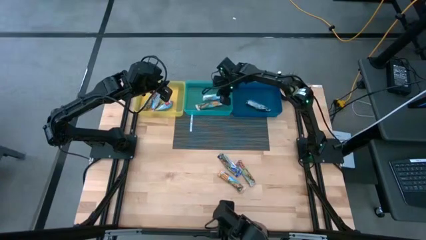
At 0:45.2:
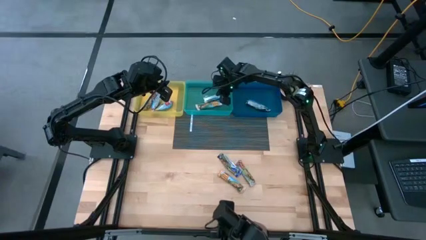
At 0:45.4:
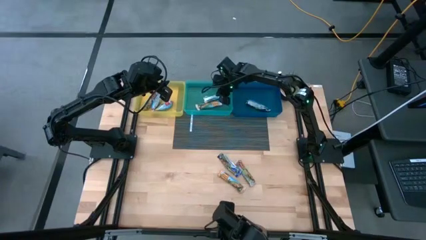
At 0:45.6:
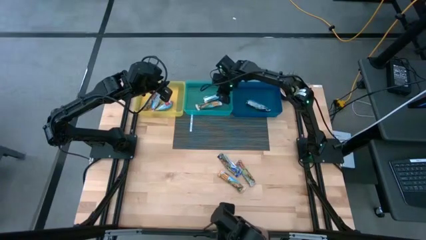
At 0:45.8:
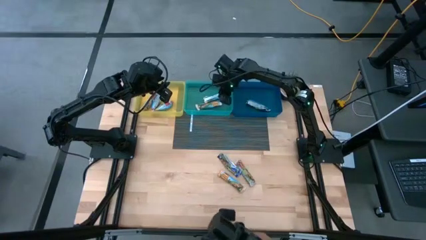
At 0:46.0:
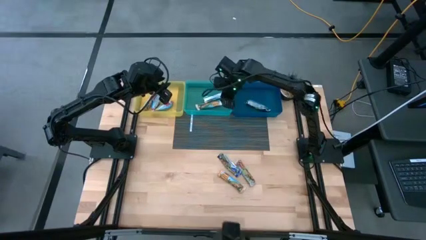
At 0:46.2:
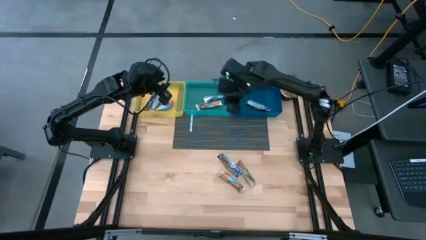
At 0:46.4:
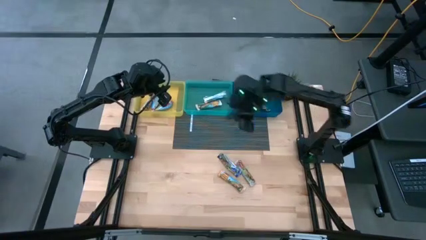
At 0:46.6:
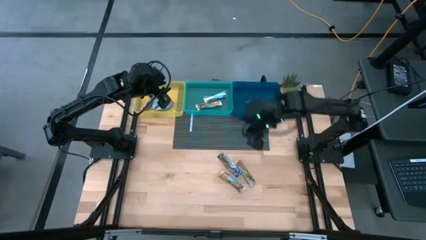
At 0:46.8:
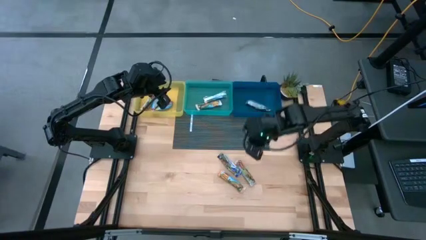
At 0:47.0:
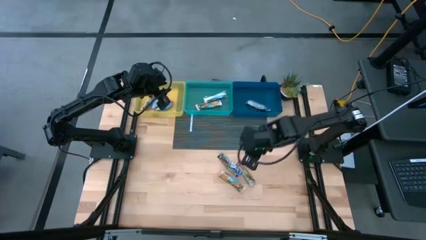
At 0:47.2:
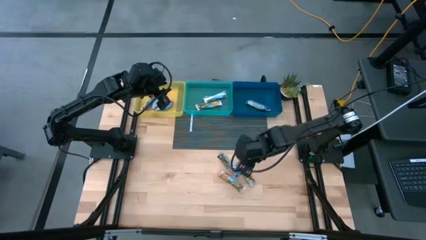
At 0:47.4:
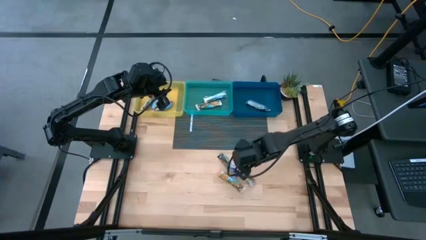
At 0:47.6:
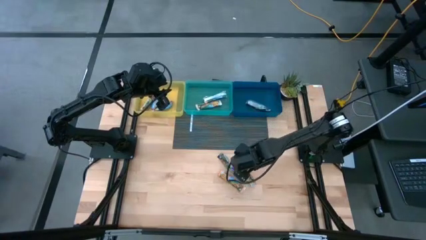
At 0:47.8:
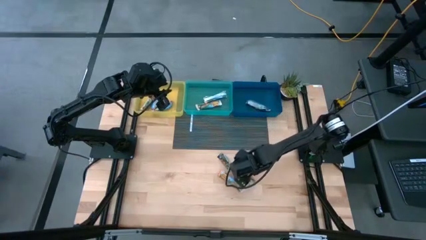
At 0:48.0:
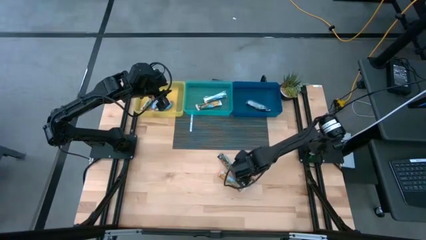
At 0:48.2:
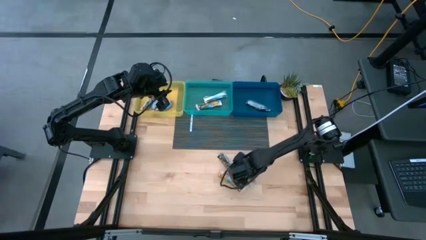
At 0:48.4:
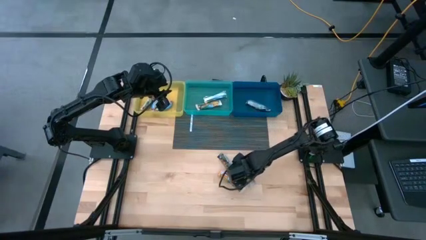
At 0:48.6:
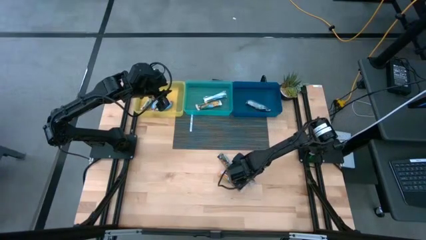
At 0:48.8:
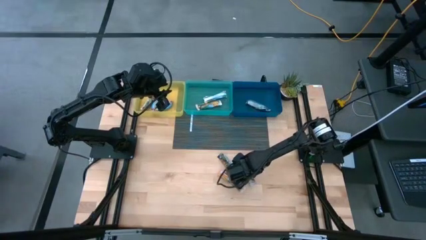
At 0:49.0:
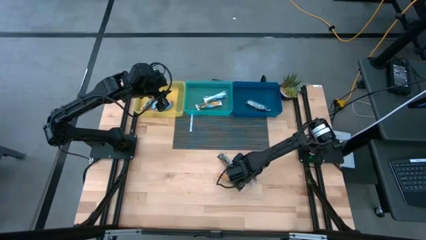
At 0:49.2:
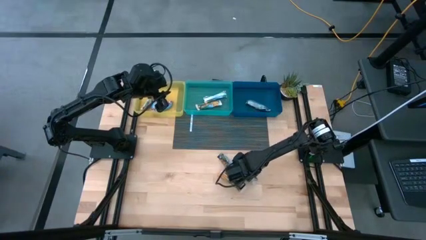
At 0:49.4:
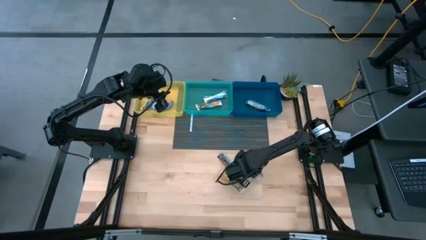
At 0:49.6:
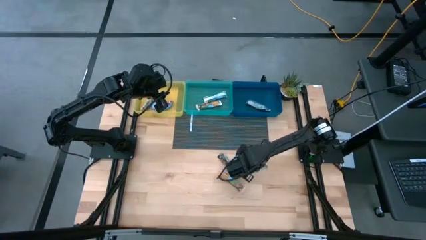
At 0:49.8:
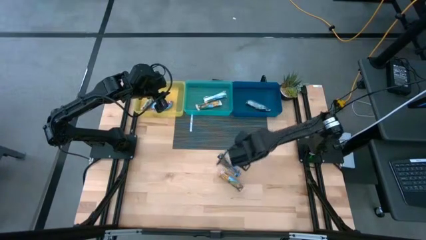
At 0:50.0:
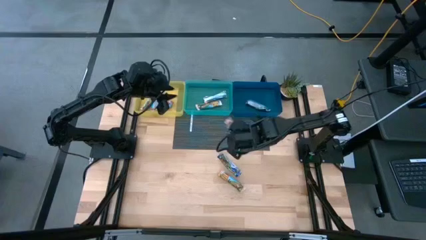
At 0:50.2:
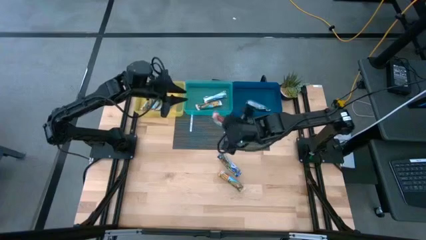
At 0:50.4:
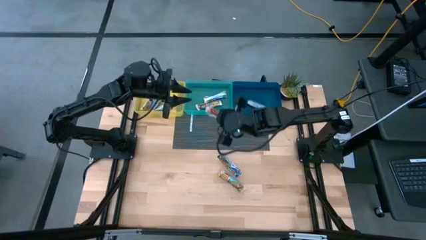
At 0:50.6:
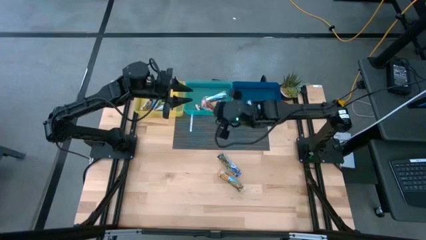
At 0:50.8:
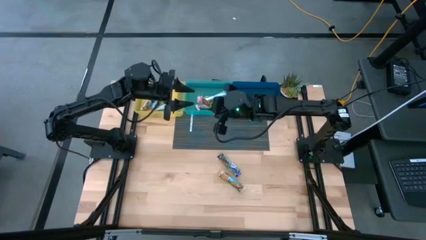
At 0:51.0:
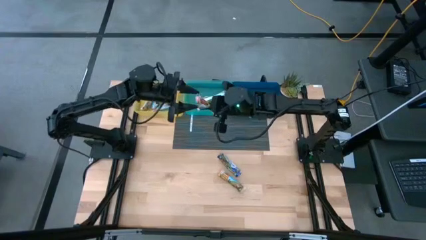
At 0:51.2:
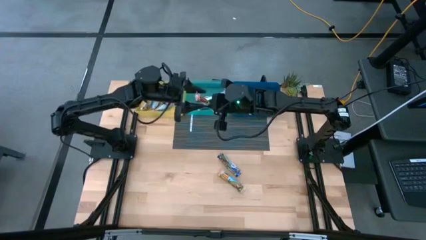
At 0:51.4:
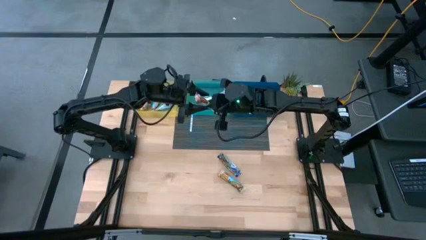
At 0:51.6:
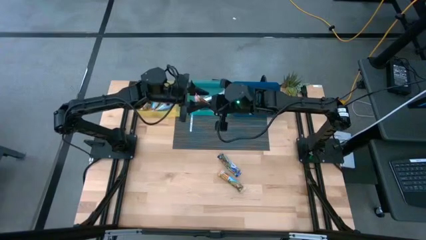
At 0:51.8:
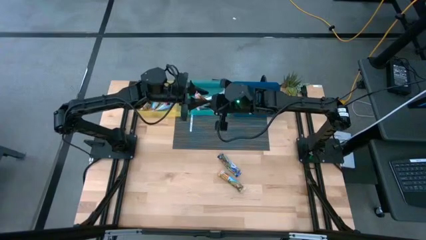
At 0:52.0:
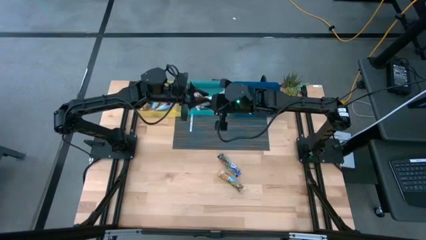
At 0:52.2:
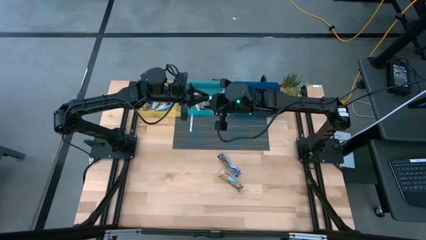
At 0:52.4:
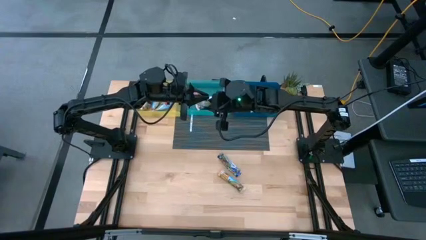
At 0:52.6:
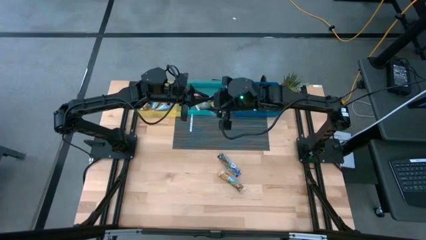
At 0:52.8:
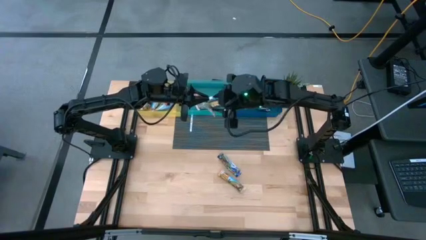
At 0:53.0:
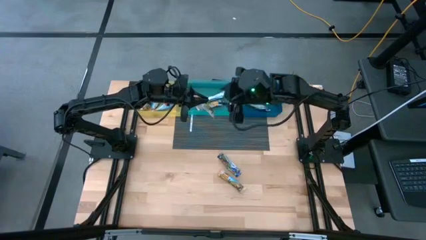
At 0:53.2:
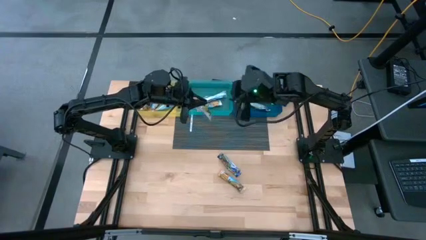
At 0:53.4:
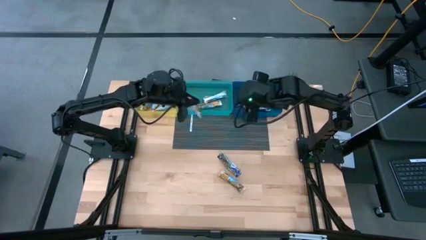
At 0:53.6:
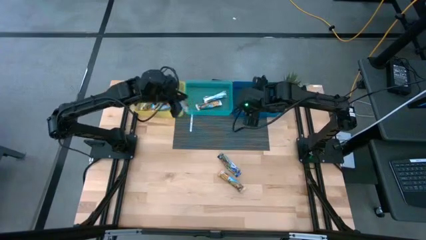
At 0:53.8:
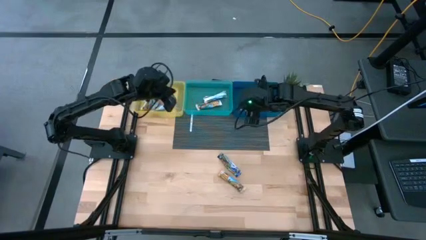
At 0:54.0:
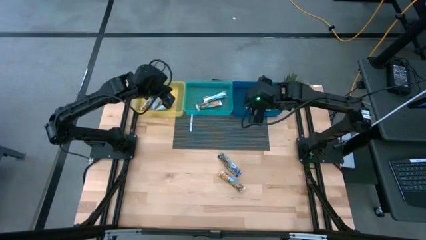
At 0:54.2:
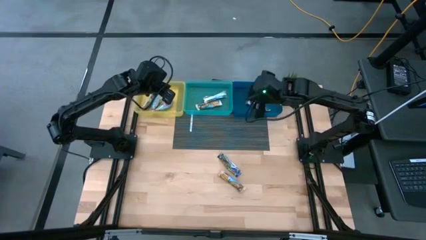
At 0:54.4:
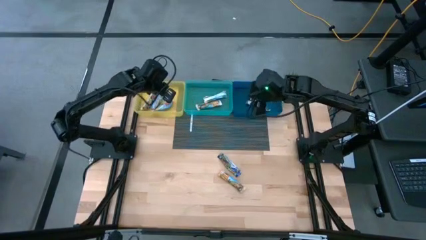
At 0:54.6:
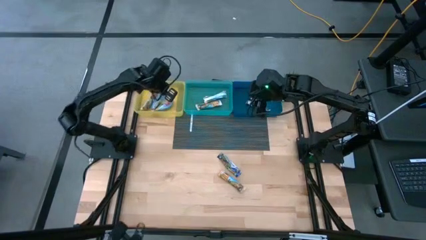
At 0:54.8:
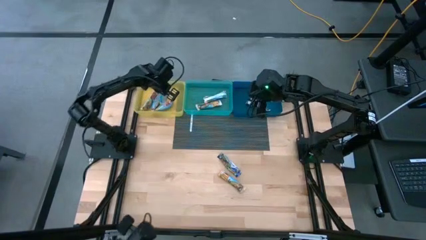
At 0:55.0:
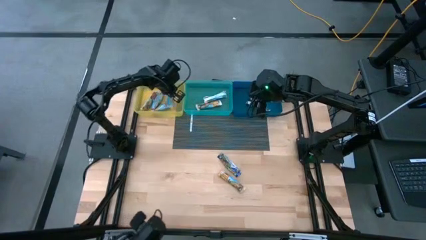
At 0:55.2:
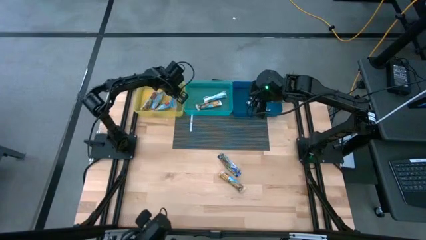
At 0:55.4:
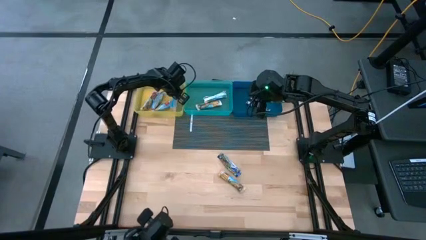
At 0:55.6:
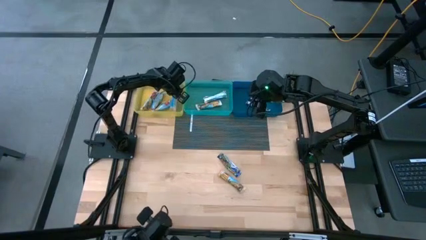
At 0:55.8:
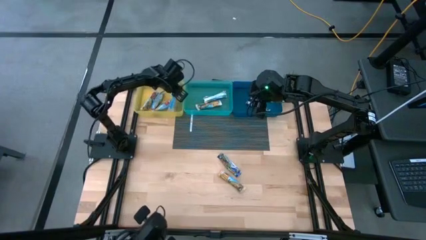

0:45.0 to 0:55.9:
Task: Pick and place Granola Bars by type
Put the red granola bar into the yellow bin

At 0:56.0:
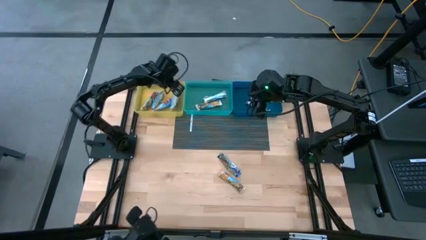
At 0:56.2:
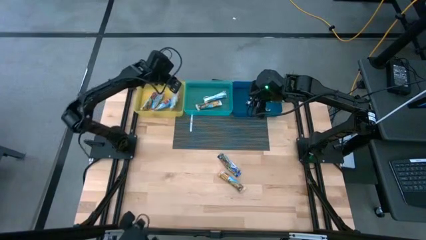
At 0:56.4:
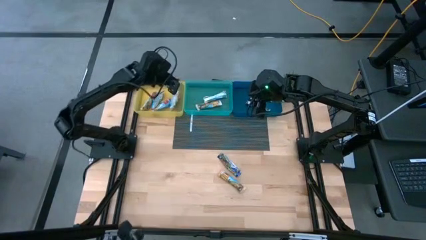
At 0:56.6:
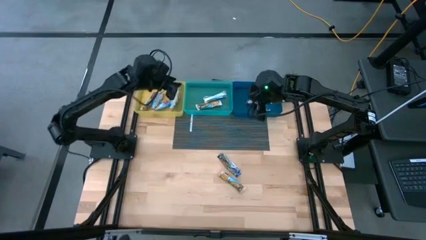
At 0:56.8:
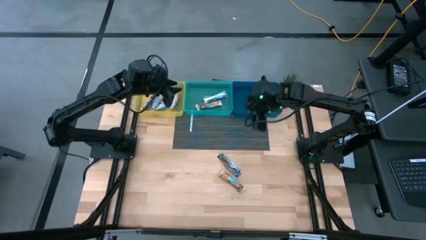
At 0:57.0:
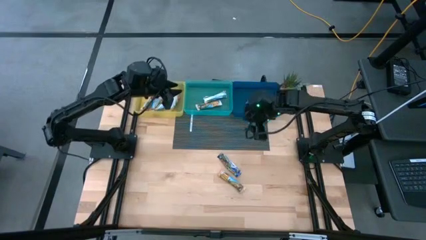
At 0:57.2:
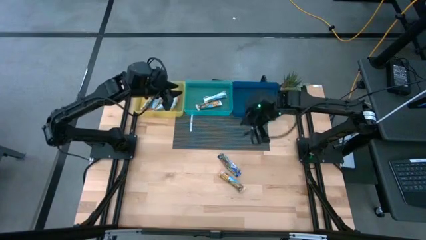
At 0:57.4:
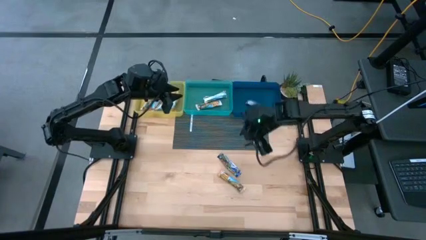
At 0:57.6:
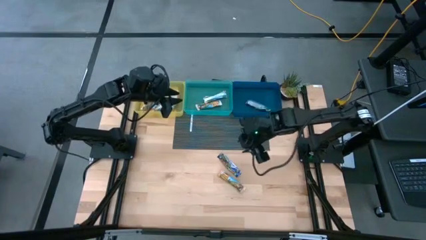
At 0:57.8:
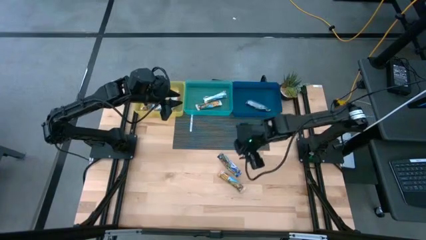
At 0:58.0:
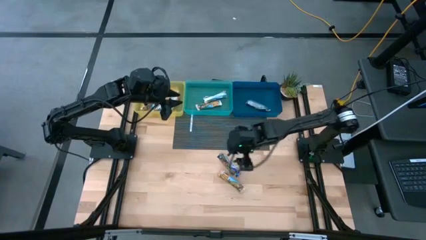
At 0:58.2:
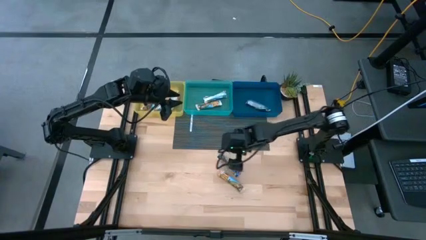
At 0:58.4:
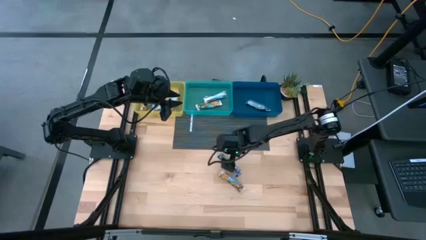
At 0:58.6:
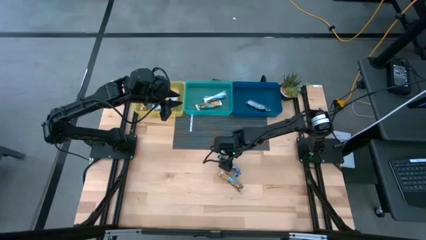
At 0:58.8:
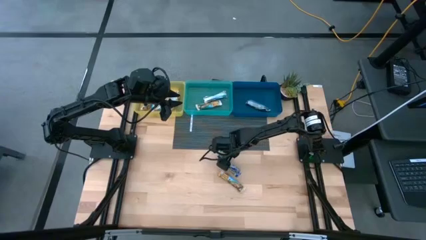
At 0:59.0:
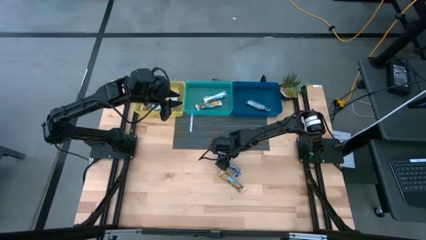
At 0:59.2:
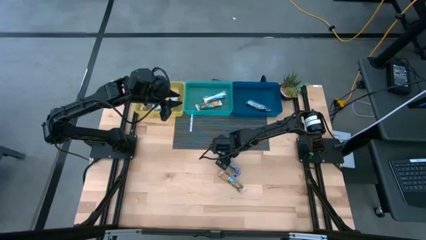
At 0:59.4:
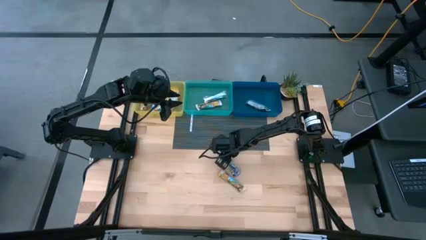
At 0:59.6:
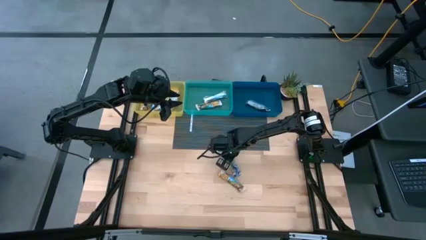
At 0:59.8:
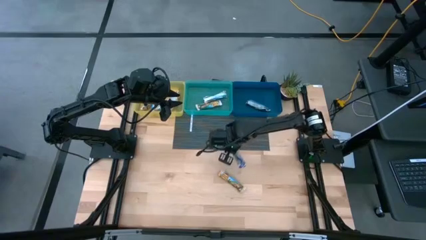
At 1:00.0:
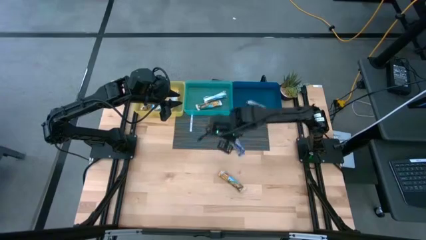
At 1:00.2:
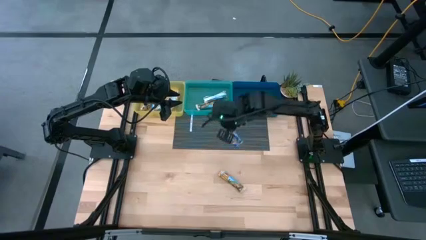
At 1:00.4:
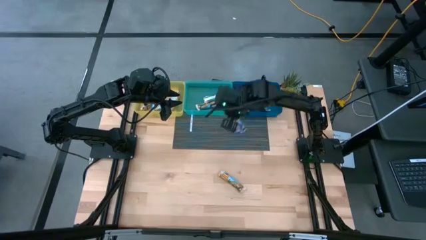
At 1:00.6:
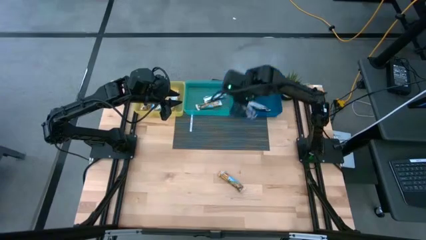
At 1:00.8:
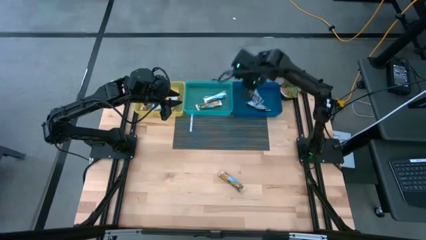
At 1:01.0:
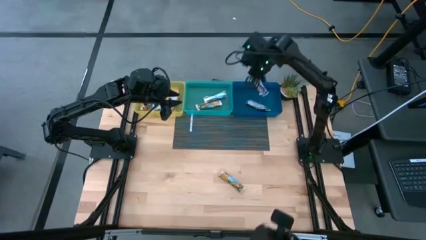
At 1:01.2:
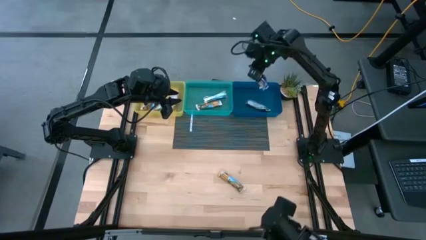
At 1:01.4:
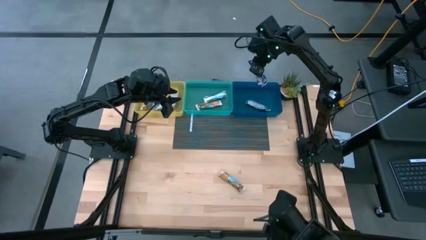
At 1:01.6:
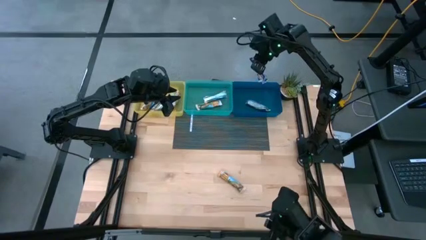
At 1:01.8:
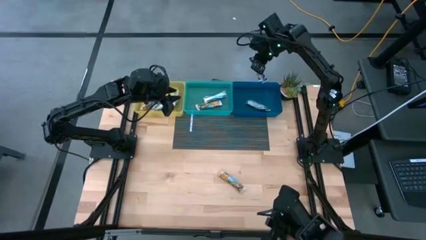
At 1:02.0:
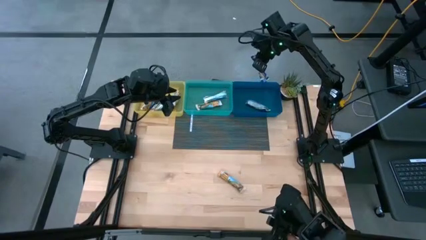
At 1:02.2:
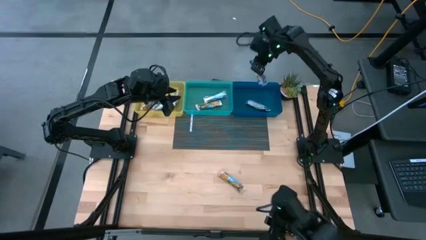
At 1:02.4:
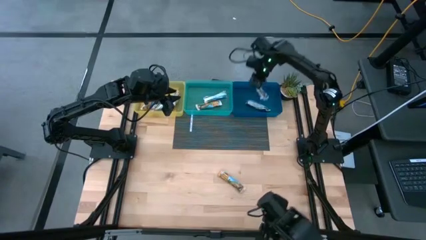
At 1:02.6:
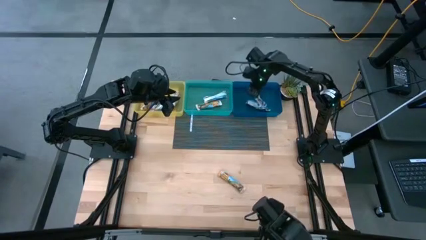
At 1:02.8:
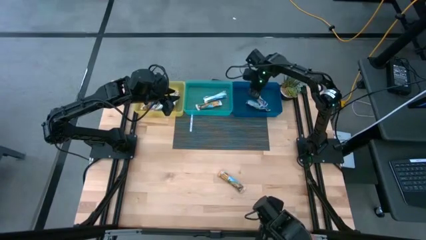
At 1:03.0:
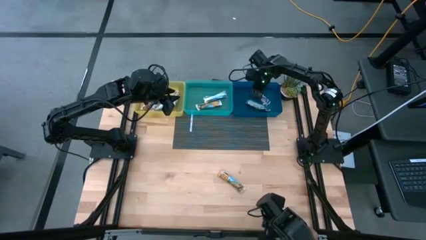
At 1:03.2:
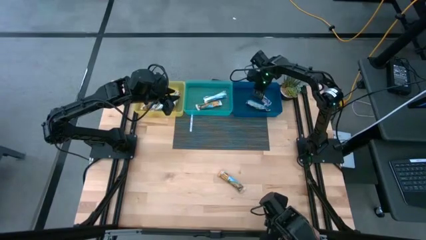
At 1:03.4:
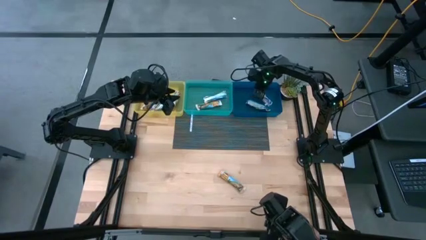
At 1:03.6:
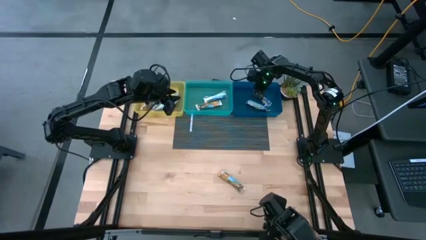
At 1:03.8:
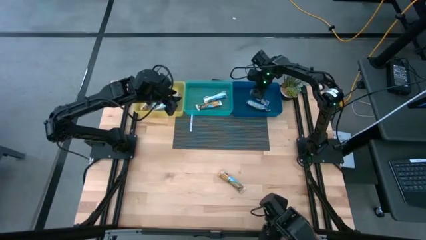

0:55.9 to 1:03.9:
Put the blue granola bar into the dark blue bin
